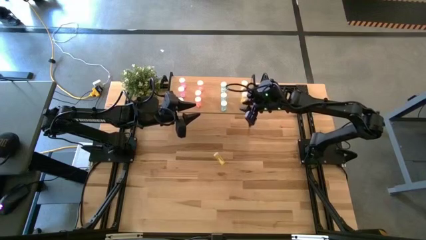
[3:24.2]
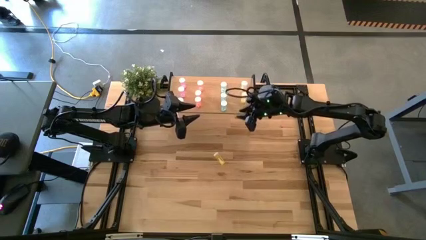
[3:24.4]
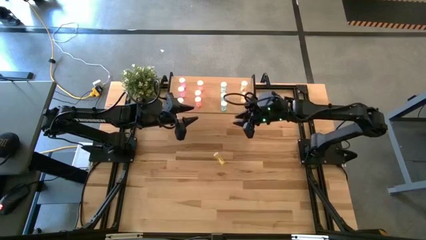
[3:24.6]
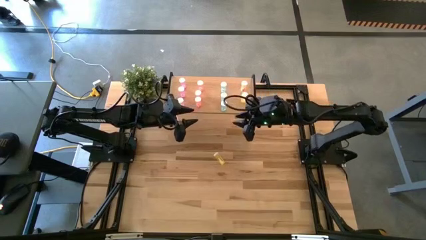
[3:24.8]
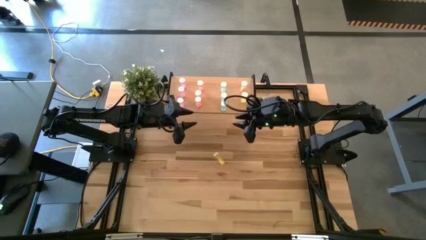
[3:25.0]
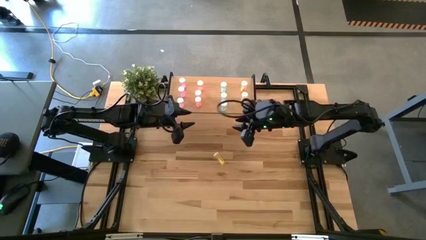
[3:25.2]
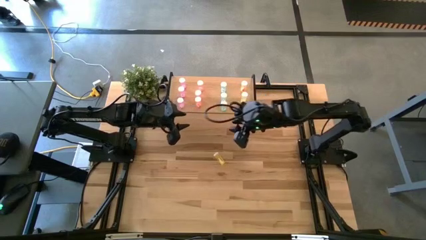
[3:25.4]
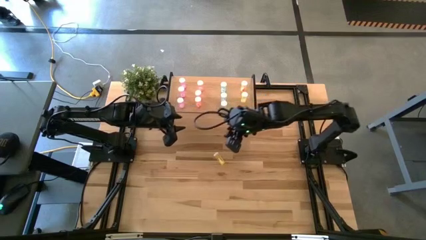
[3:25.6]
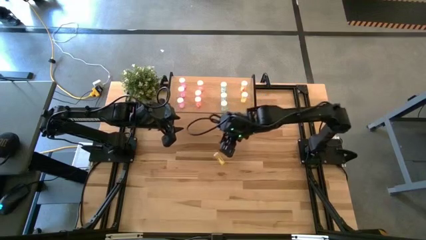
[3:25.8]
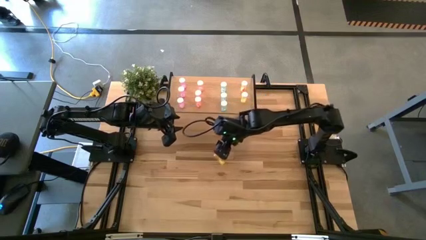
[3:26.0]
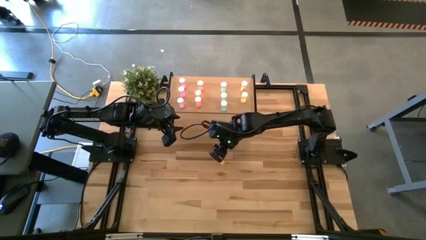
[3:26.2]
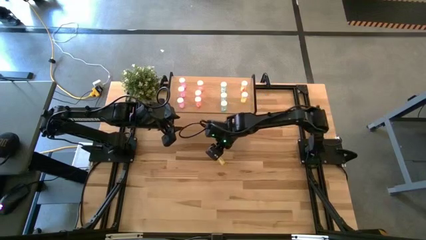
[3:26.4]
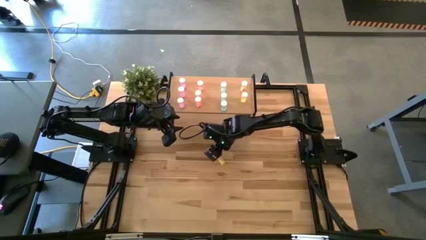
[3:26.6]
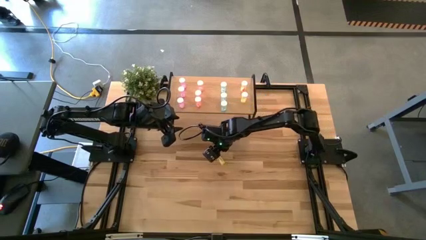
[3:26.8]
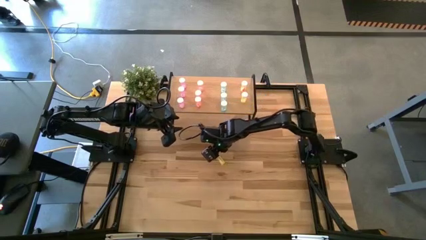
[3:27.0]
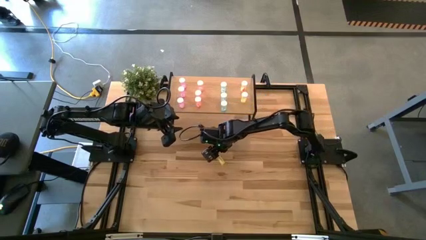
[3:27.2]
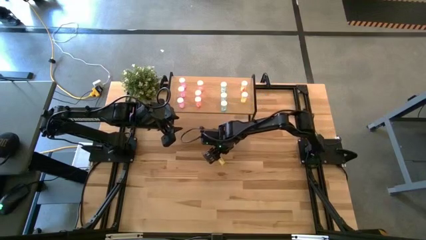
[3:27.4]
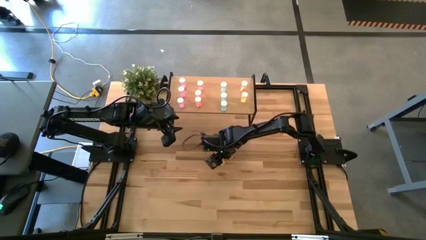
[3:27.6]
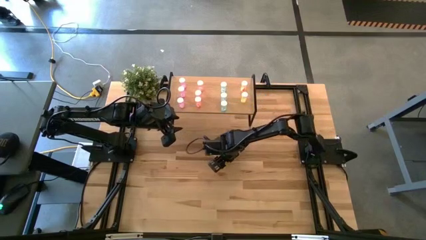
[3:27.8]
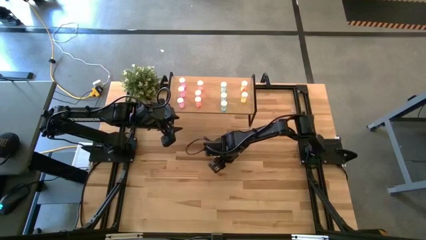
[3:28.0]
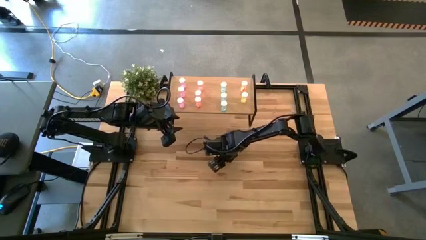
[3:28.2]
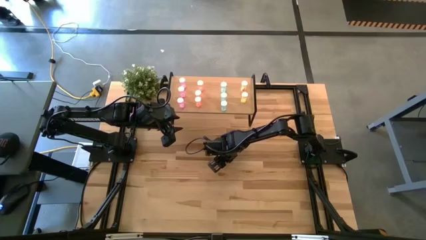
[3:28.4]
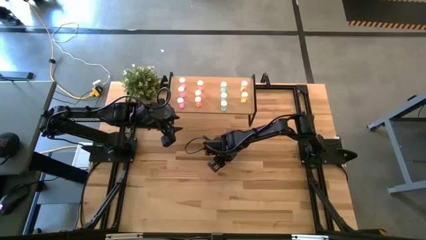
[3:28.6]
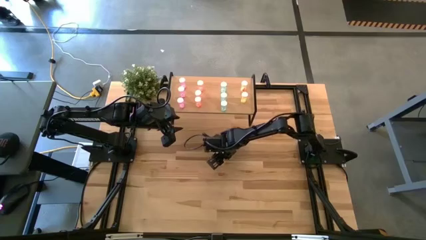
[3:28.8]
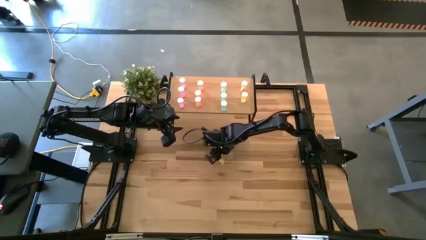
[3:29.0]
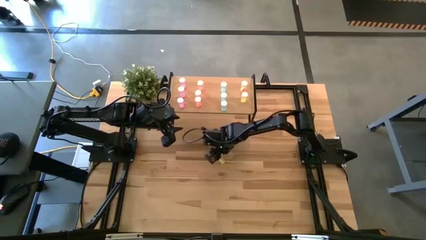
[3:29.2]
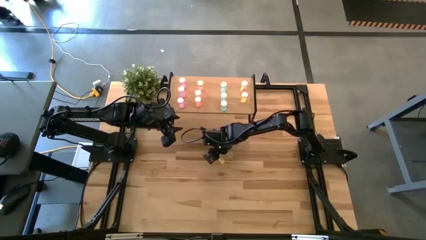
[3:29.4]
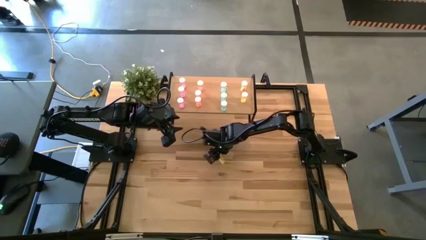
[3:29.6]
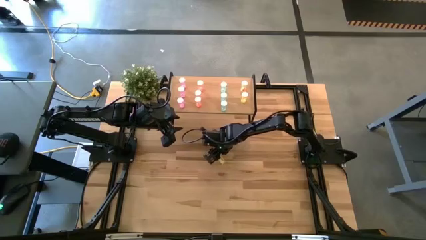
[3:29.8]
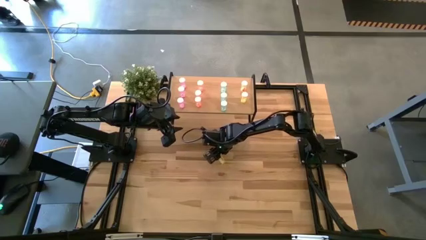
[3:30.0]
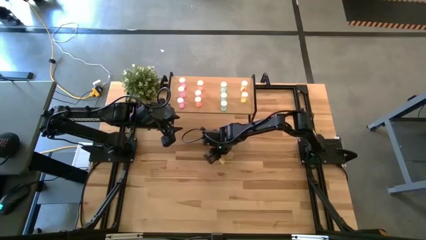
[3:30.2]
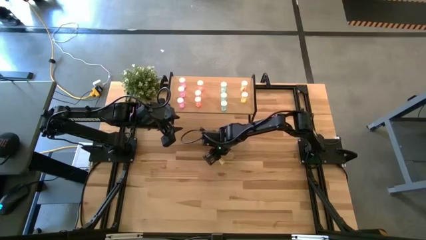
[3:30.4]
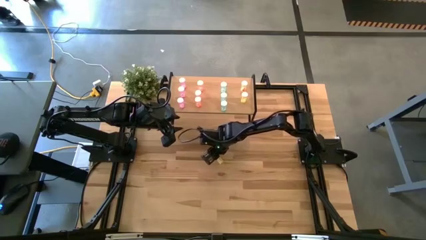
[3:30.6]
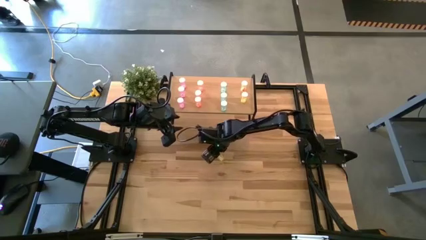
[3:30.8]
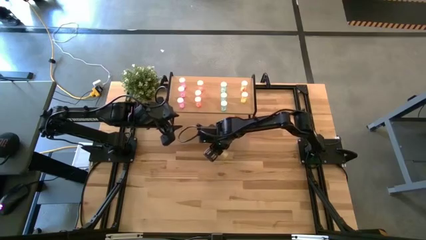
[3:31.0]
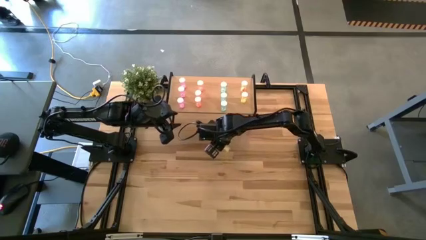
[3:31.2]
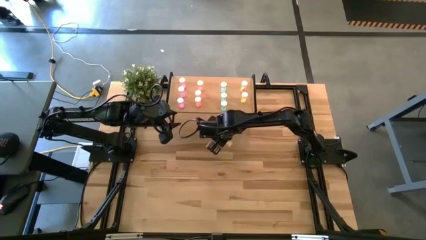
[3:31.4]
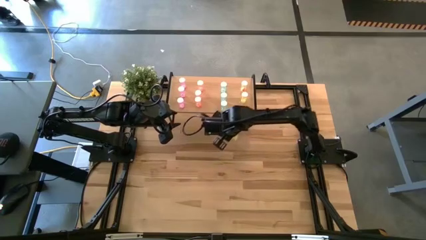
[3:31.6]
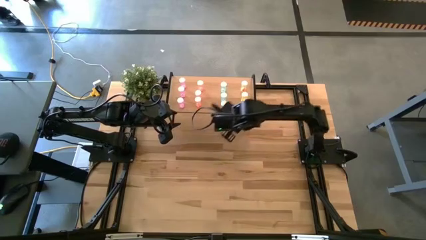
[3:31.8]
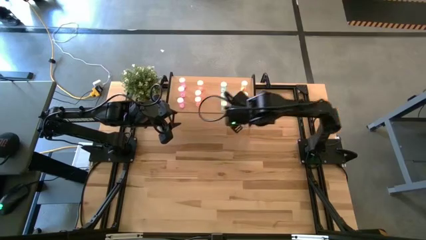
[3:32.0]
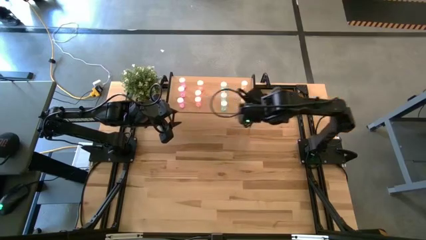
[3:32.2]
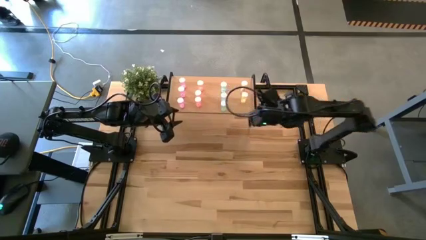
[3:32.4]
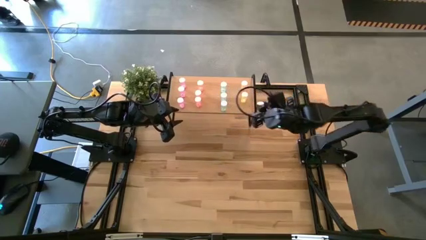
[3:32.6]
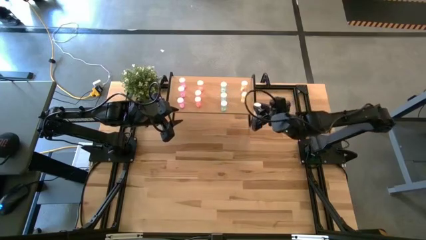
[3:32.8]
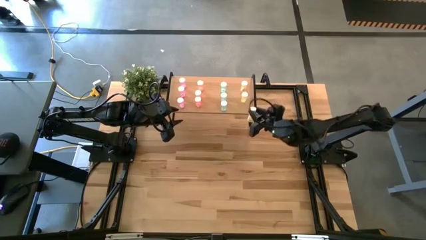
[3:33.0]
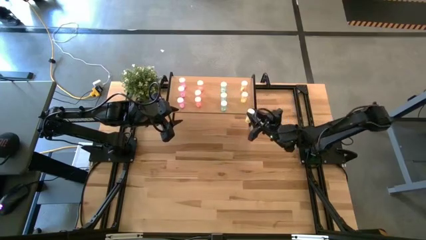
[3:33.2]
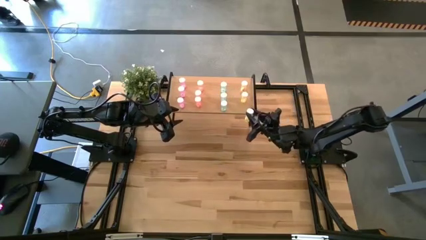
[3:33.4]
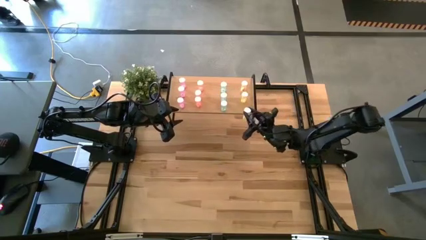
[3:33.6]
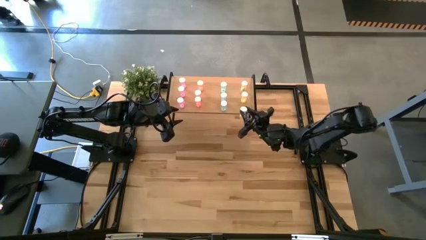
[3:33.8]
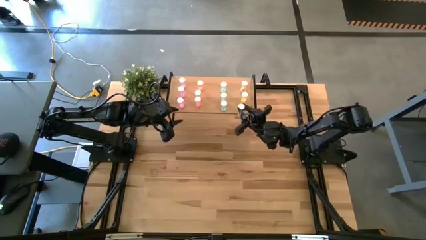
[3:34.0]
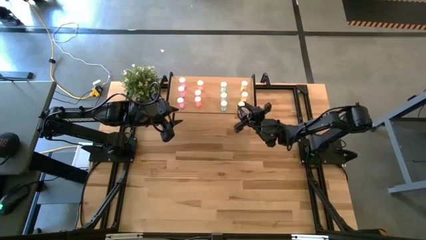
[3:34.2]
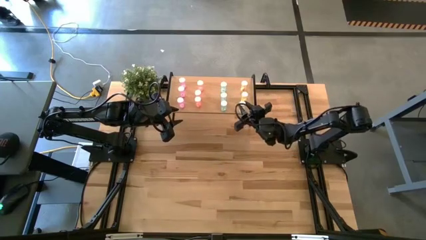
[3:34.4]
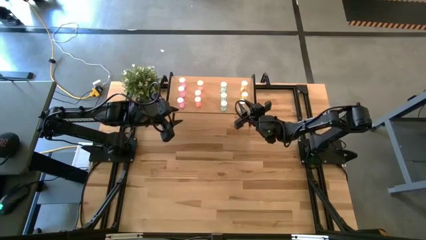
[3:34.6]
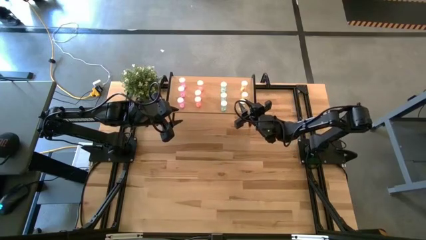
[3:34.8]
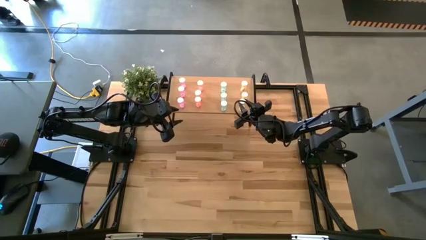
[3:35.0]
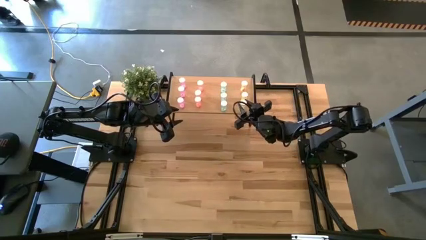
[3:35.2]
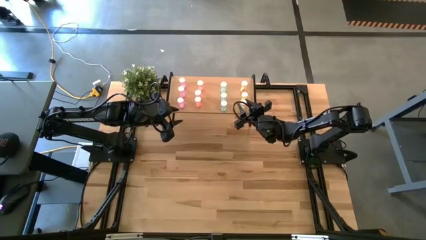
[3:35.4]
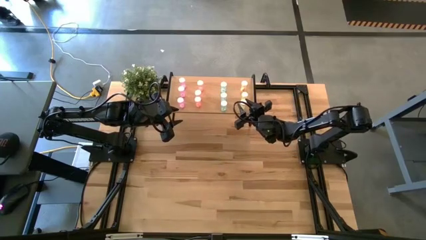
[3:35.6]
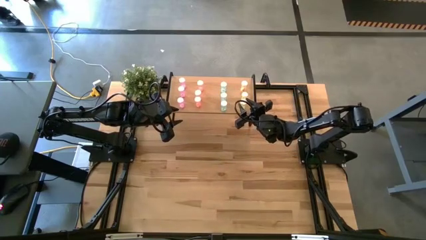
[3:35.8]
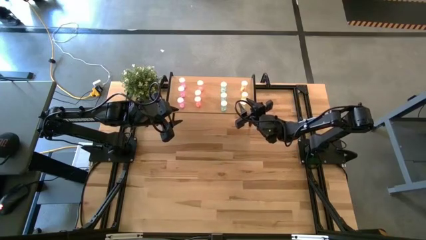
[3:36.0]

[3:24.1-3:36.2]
Task: Pick and place medicine bottles onto shelf by color
Put the yellow pill bottle on the shelf aligned with the other yellow pill bottles
